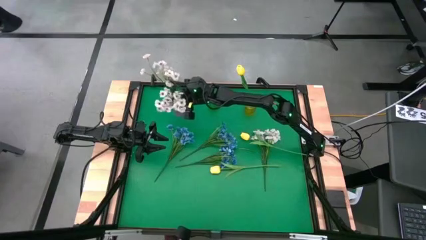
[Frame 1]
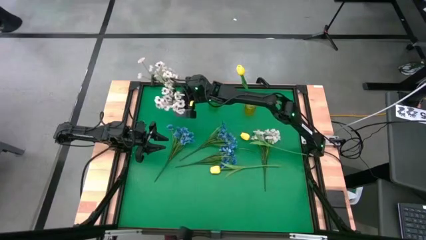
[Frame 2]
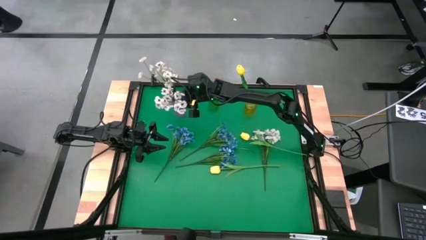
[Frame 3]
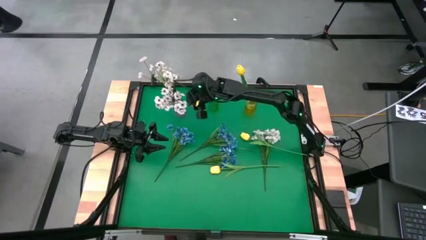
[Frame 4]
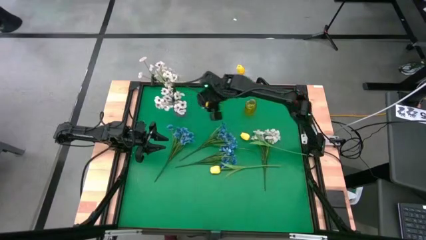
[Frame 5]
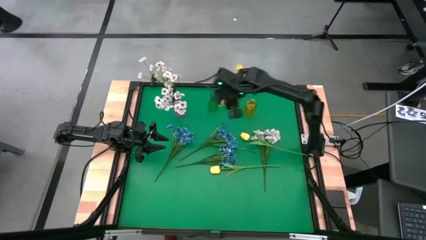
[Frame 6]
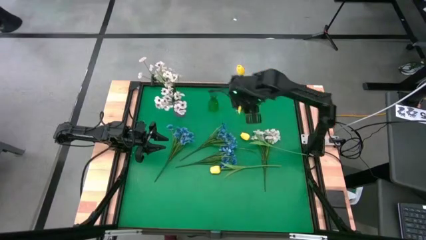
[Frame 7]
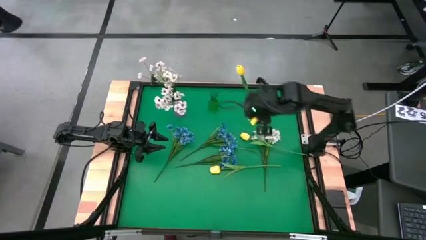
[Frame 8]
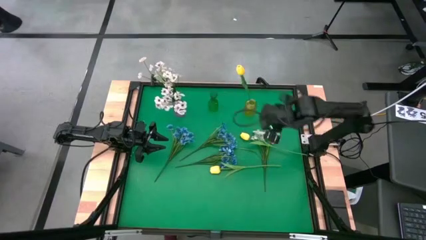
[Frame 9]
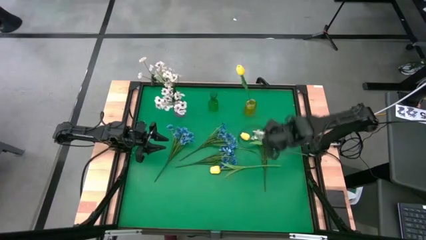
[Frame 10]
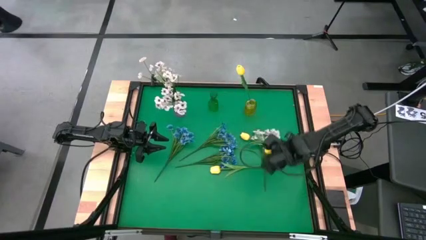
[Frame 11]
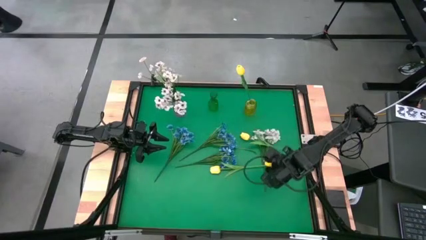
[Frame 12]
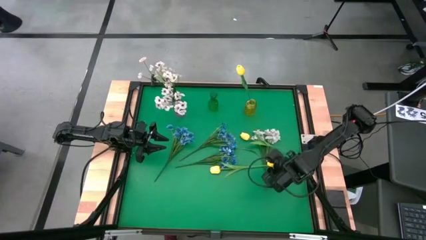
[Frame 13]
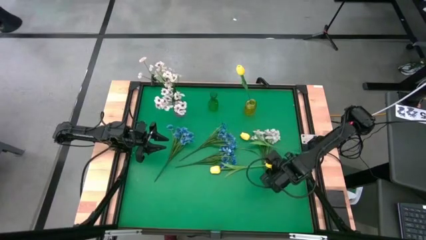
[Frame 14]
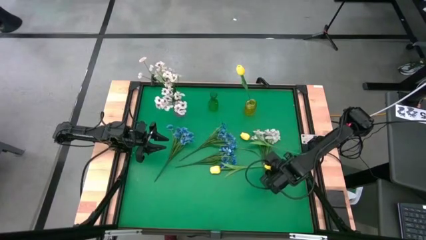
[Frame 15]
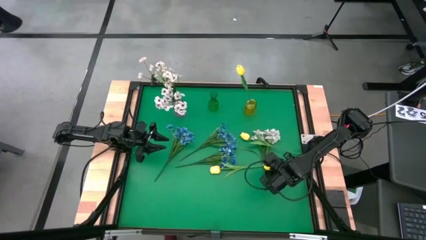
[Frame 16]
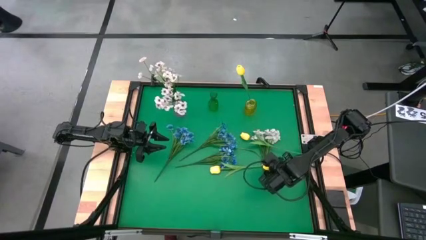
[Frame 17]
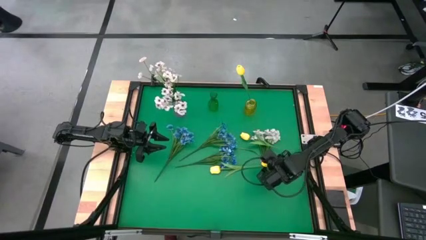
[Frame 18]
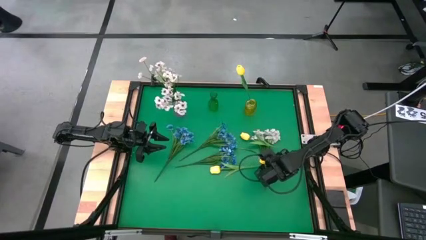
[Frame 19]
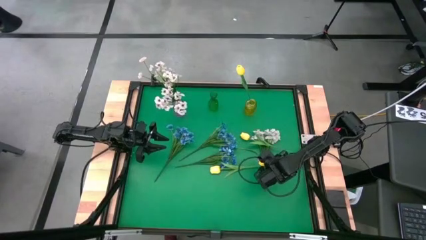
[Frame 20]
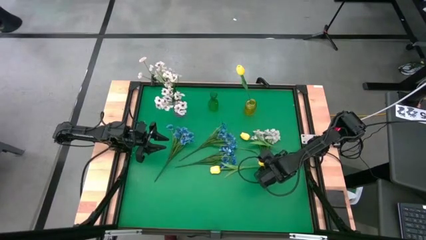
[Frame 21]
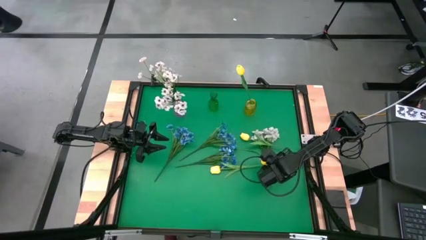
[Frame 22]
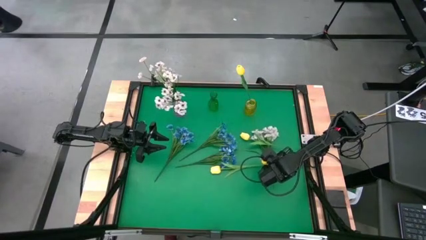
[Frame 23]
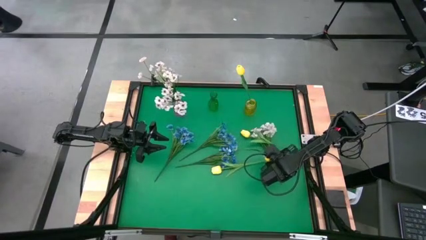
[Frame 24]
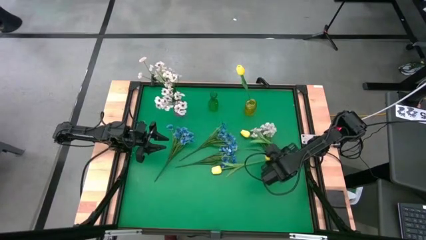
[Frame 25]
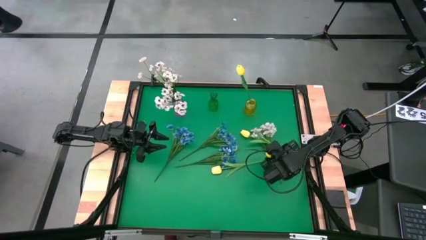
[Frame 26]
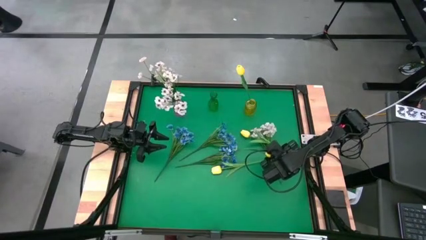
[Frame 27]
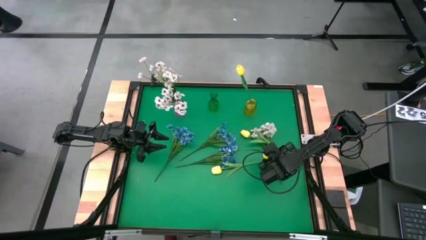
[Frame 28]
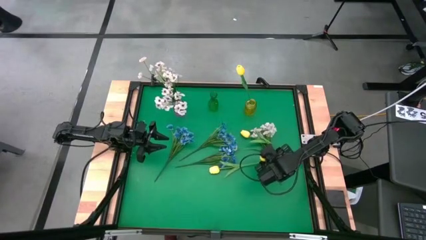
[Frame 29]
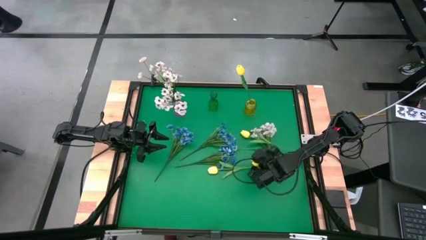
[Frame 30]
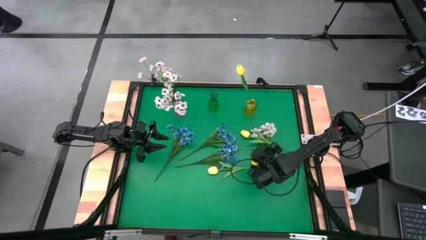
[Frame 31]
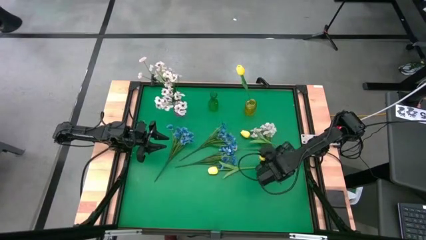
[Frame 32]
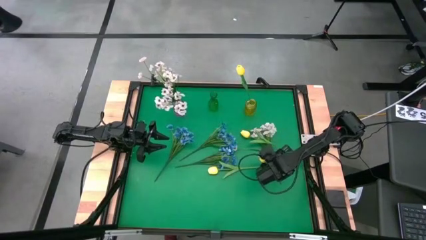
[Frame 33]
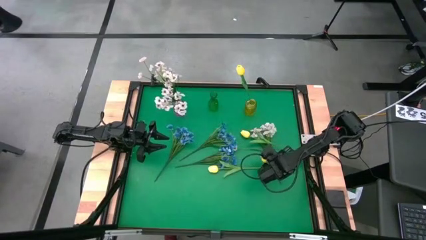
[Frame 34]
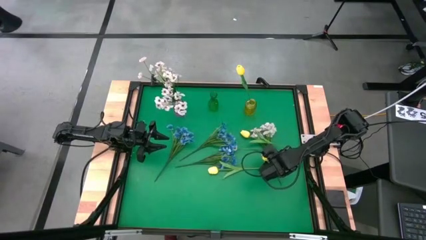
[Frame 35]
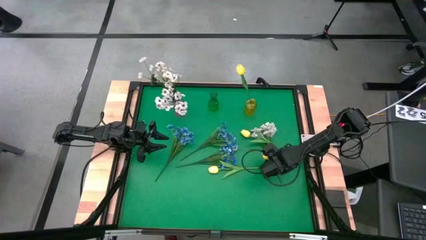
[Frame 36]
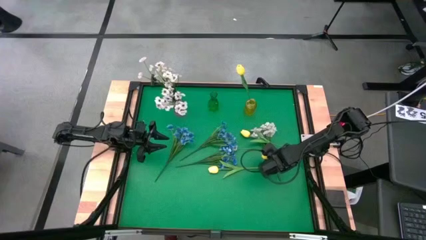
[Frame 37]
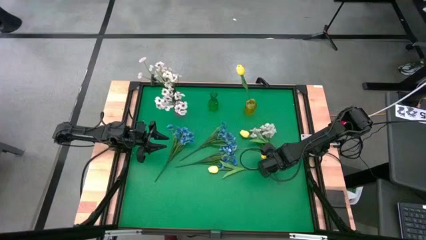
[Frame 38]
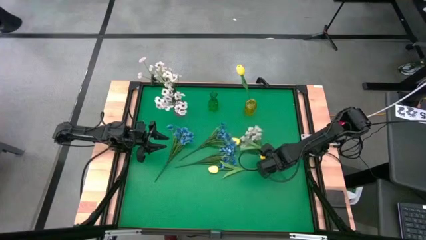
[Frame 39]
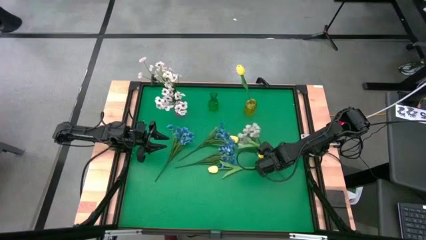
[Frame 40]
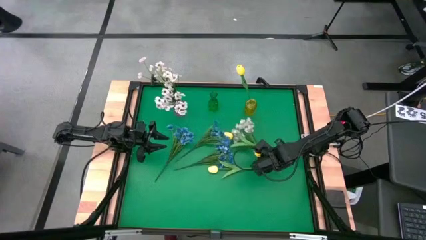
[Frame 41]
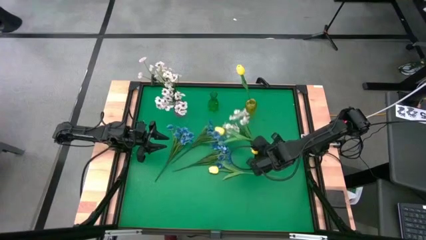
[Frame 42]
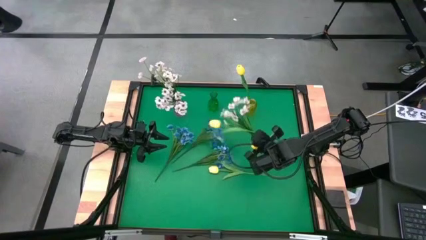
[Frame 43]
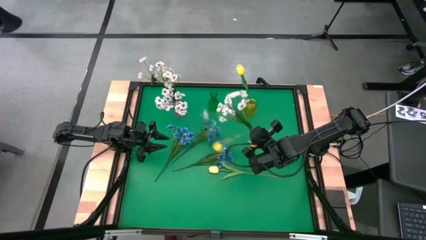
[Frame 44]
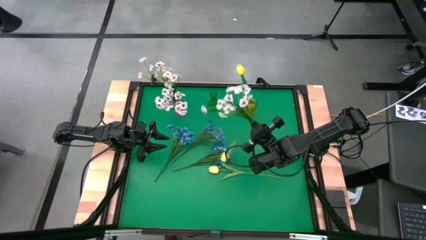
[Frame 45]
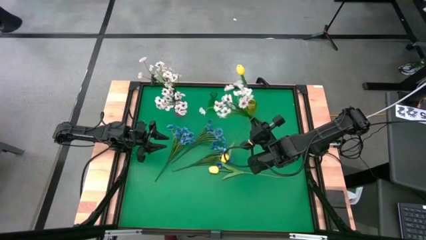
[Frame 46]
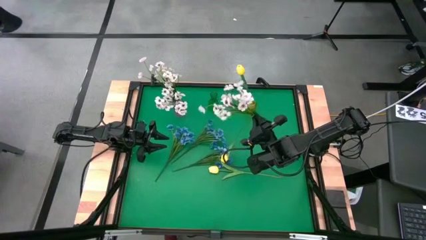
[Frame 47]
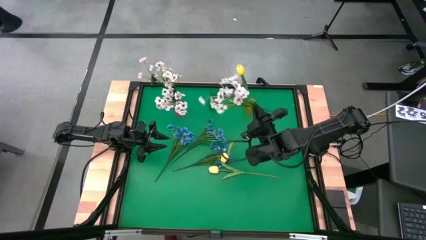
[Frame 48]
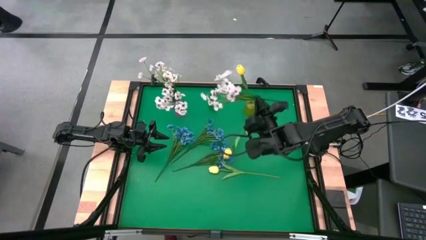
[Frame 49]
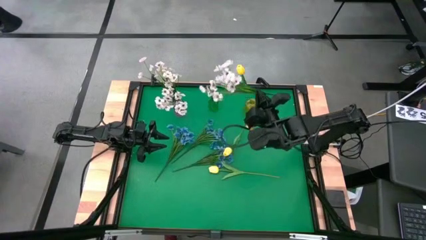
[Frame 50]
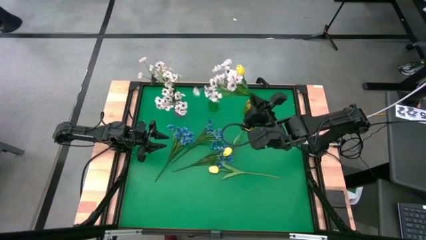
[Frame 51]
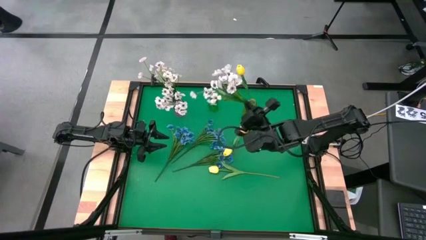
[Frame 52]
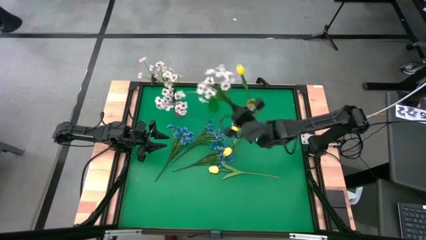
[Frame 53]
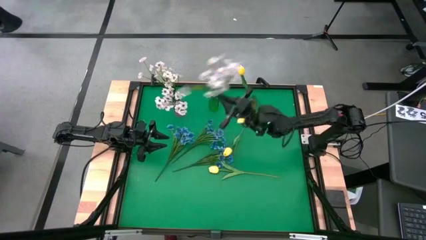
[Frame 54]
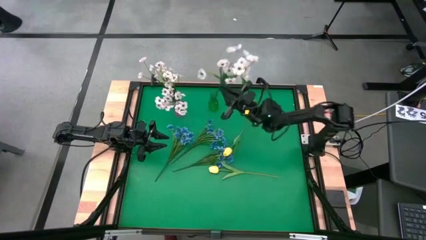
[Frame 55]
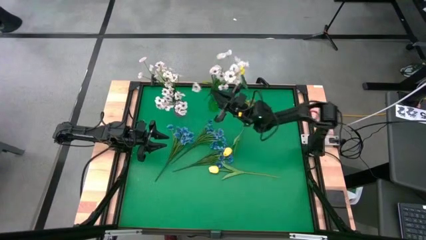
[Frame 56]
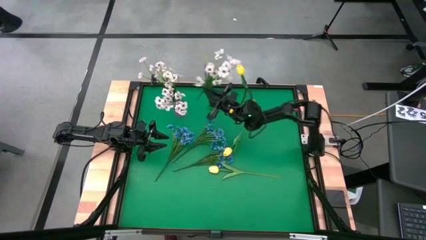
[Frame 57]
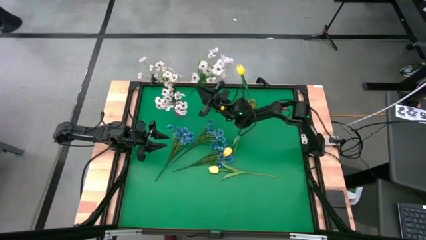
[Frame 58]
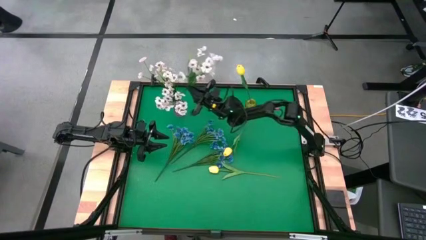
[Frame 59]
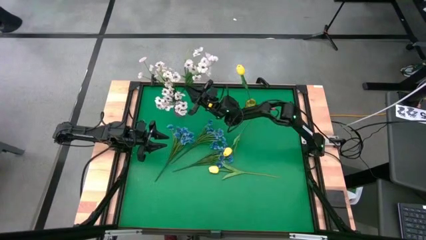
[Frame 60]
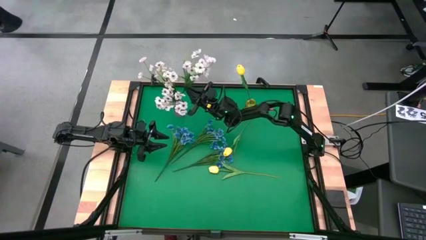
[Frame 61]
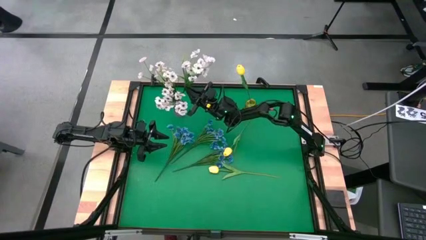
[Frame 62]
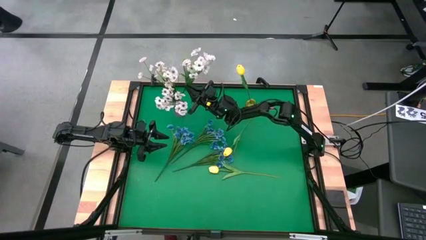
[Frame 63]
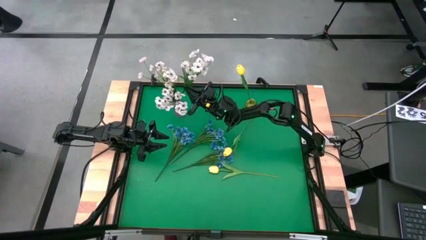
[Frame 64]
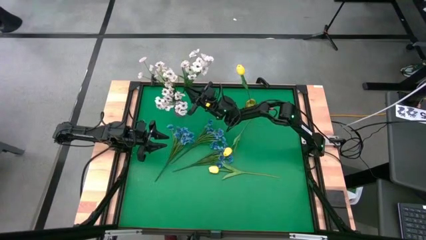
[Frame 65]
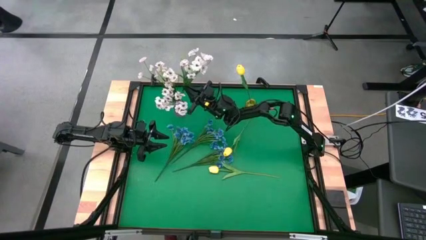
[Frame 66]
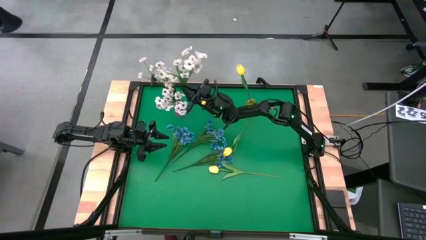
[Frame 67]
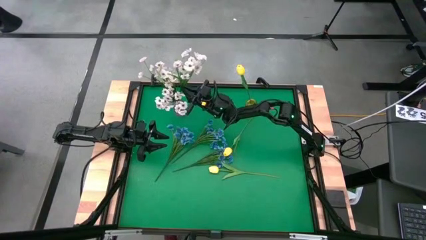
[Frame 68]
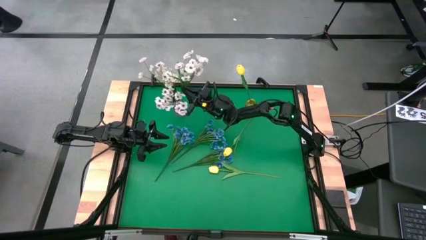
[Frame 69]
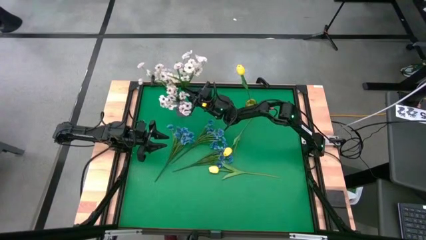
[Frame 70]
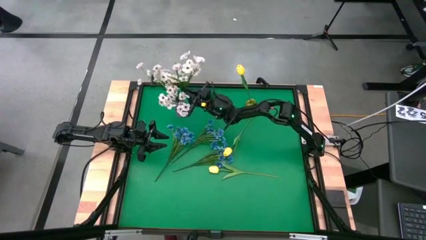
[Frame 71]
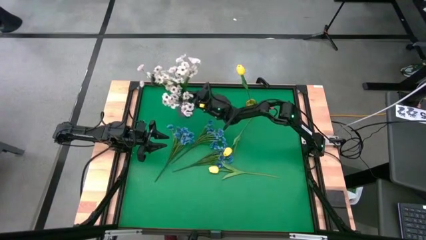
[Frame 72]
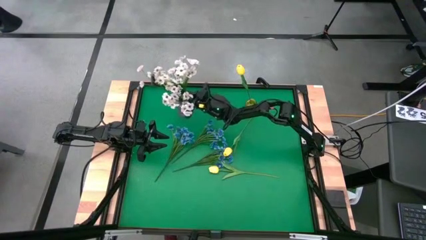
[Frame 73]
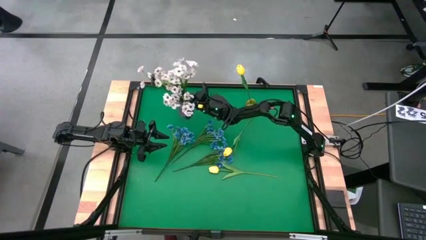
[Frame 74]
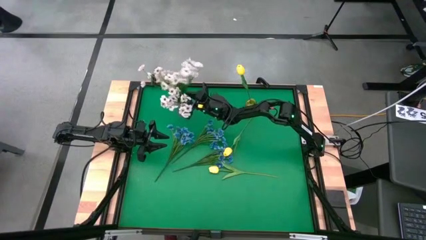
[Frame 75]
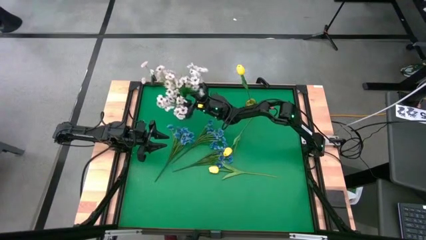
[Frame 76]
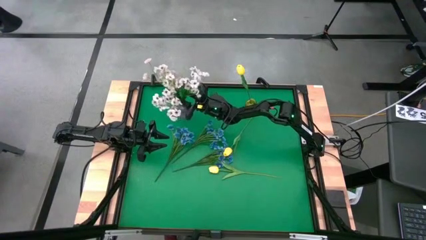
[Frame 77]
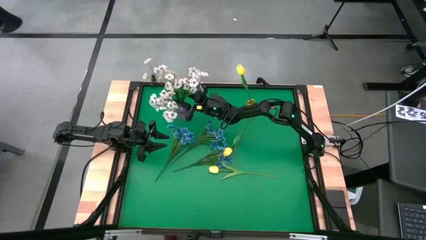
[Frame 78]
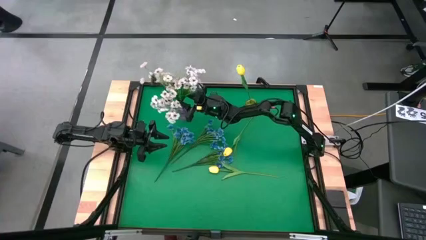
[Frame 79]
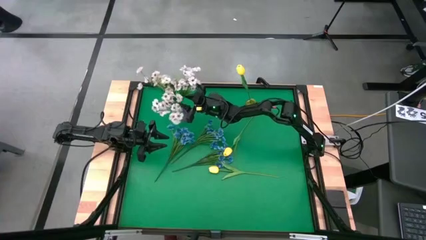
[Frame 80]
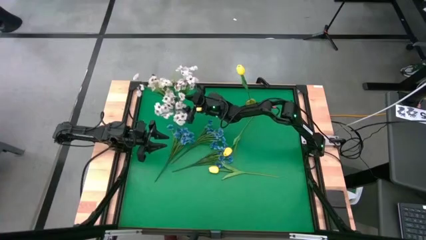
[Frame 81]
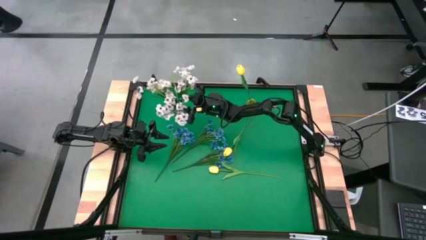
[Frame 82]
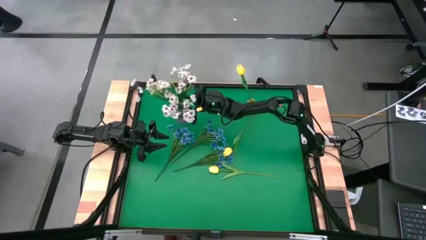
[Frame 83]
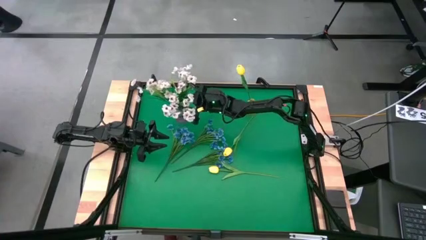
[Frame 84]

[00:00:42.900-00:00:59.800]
Task: Sort flowers into vase by color
Put the white flower into the violet vase
